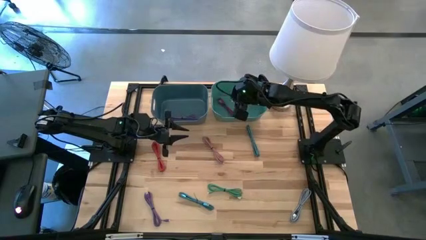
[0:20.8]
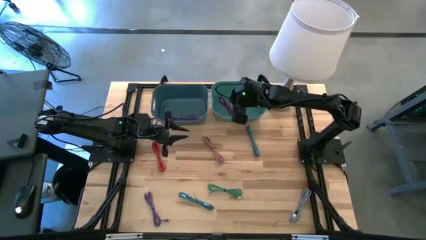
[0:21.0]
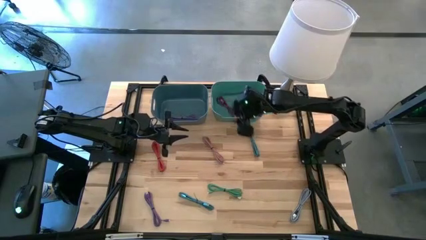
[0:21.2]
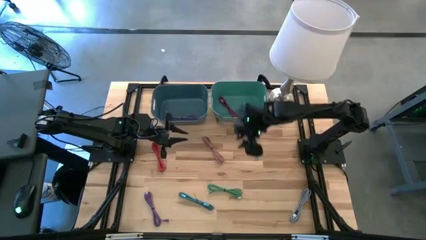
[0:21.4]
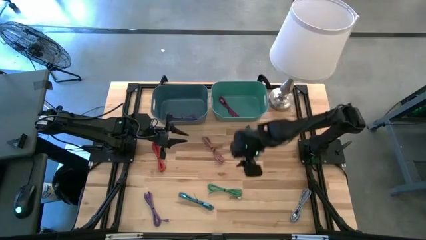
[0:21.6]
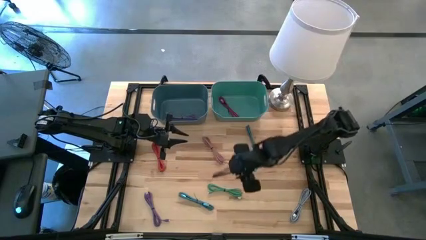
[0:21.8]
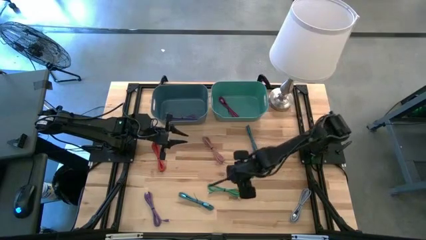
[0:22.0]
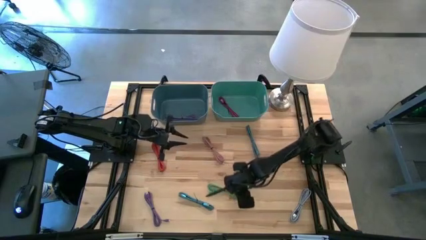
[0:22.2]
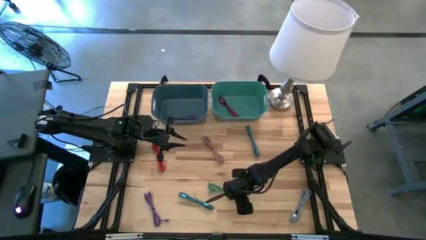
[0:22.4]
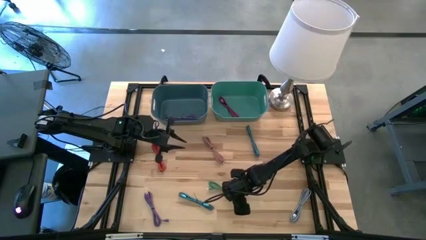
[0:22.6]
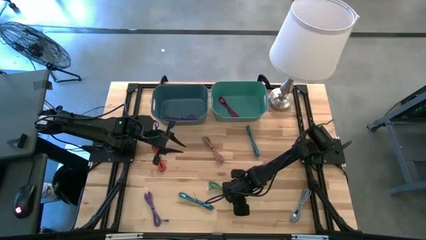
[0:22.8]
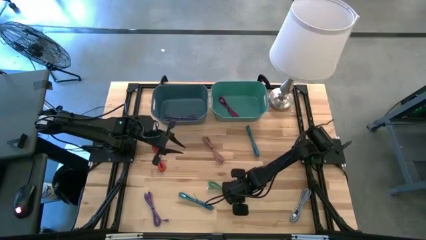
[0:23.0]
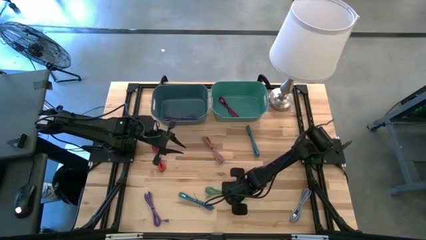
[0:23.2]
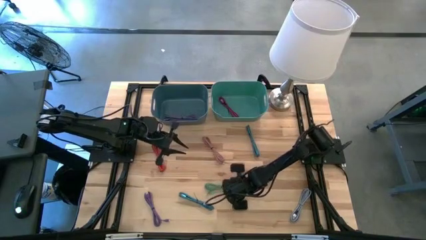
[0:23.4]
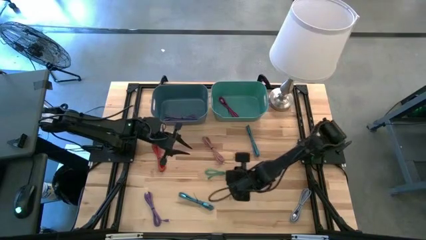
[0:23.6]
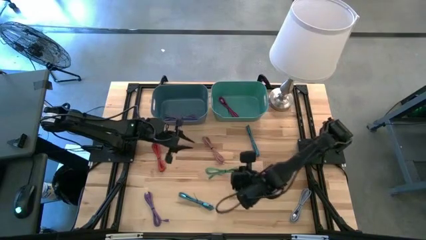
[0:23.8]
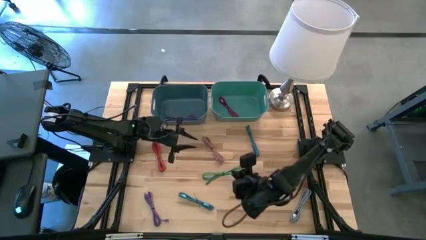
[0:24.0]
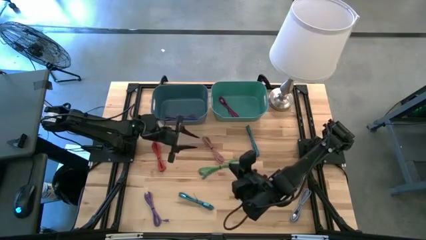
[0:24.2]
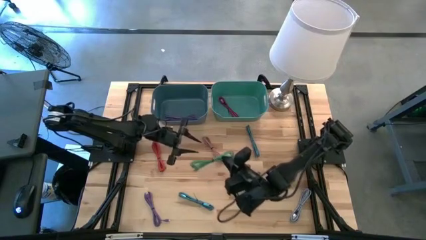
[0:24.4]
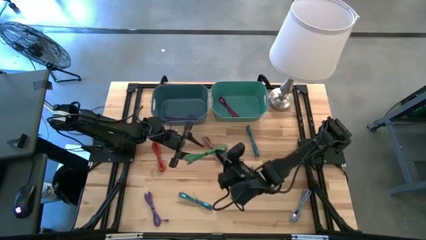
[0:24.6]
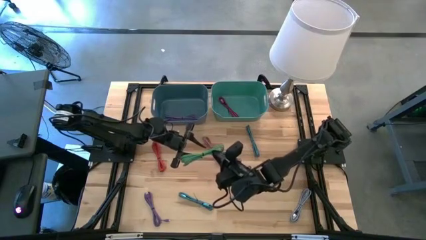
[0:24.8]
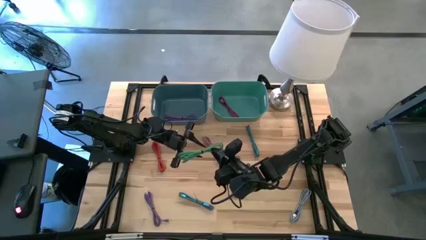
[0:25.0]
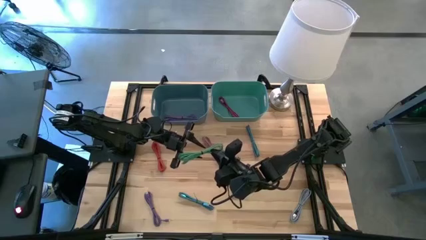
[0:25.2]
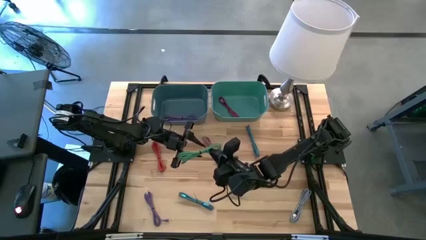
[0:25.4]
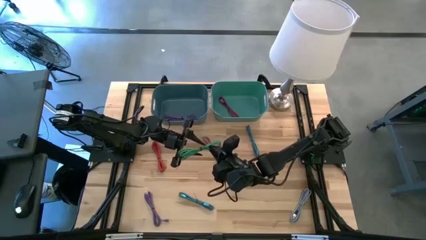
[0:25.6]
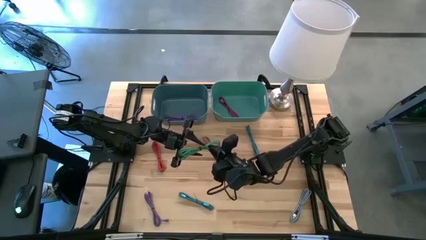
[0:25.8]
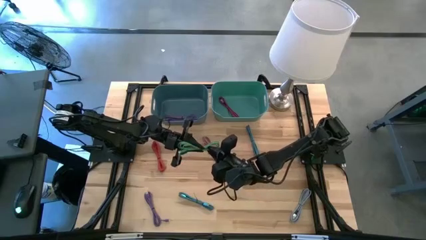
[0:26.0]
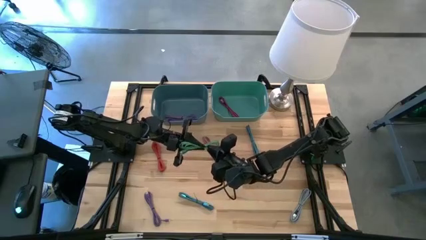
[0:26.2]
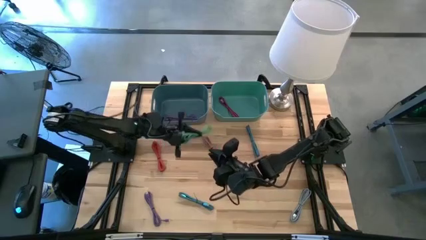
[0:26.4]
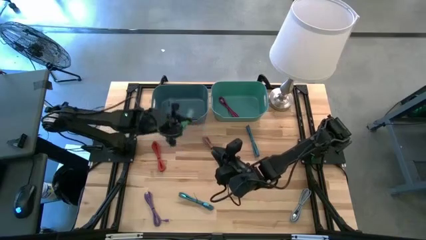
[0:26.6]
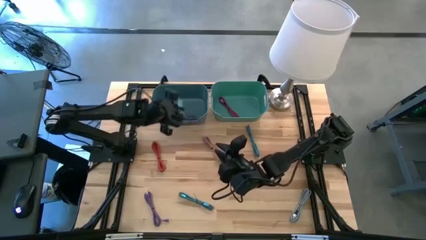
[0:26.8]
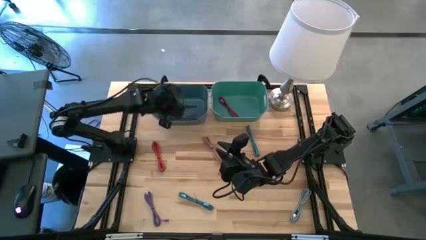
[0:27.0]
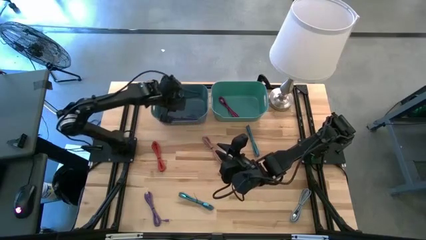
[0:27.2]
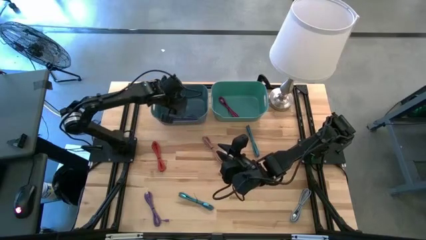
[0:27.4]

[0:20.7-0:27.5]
Task: Pick & Place USB Port
Put the green usb cable into the blue bin

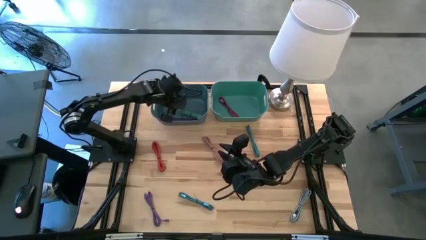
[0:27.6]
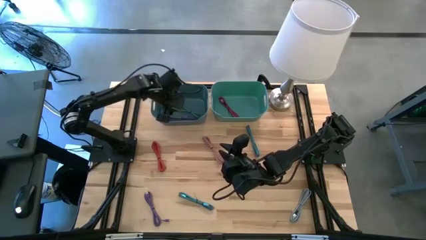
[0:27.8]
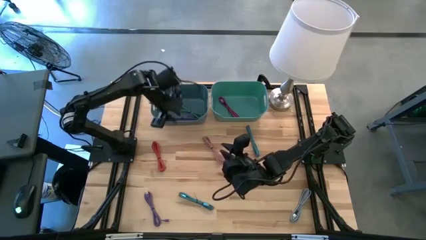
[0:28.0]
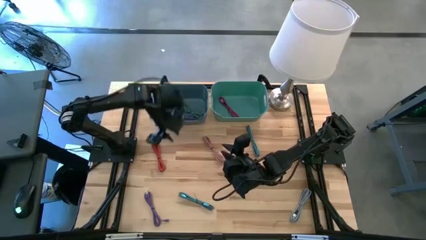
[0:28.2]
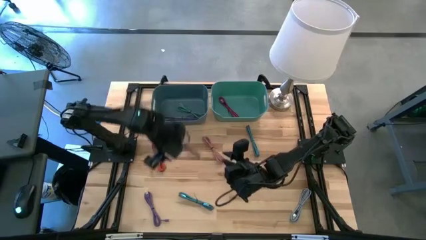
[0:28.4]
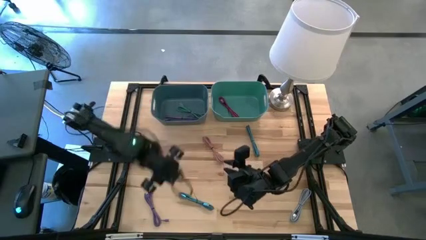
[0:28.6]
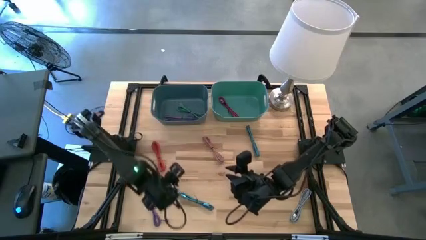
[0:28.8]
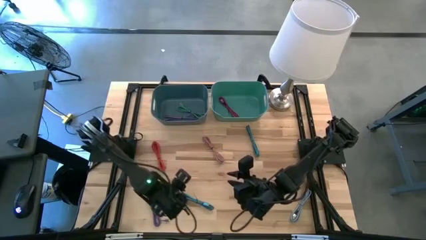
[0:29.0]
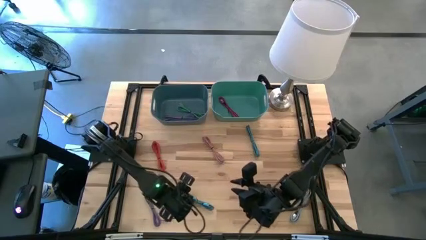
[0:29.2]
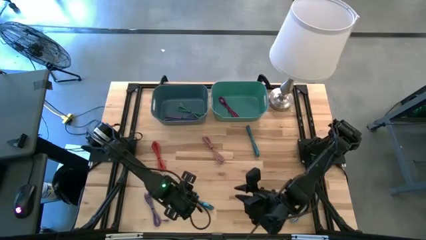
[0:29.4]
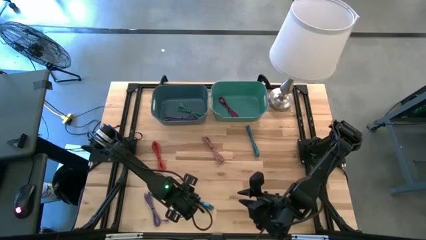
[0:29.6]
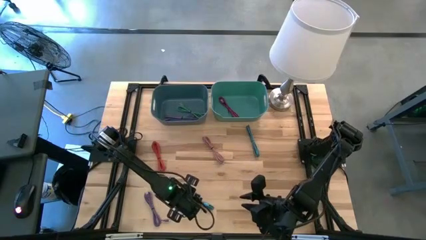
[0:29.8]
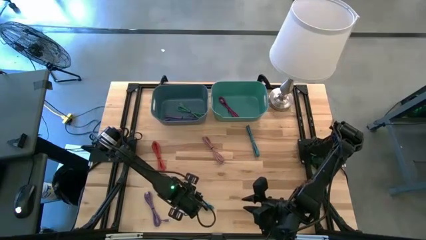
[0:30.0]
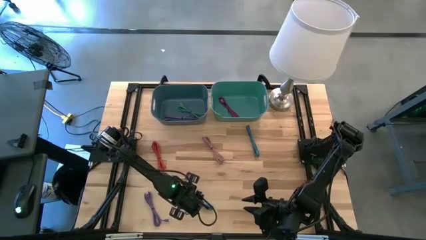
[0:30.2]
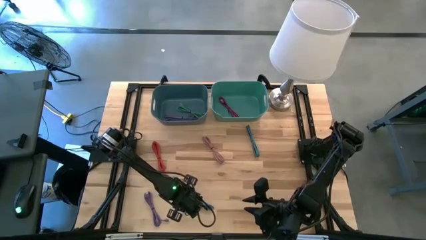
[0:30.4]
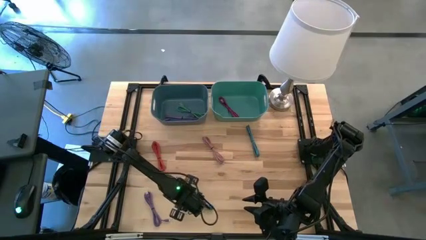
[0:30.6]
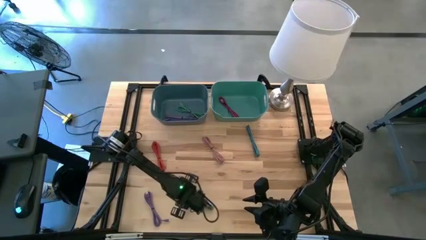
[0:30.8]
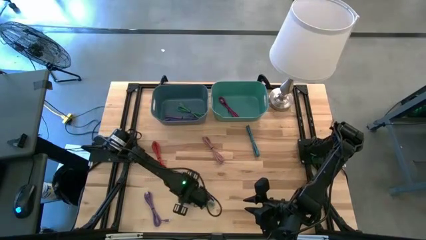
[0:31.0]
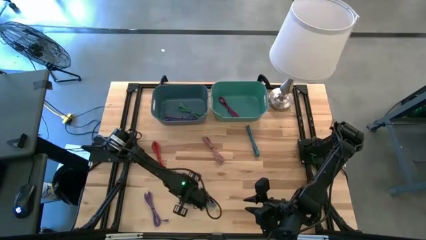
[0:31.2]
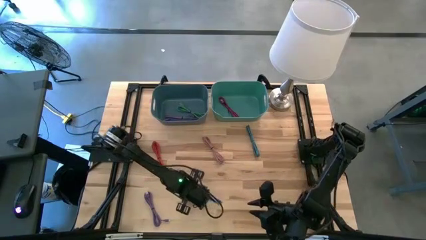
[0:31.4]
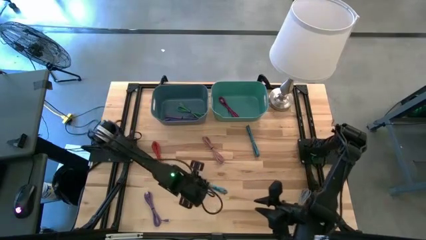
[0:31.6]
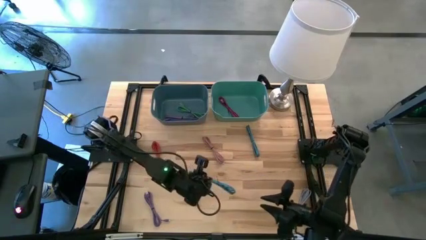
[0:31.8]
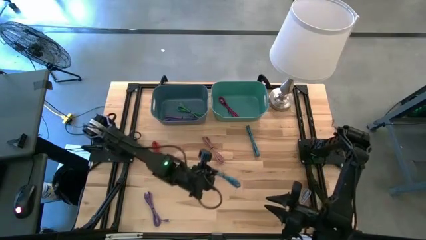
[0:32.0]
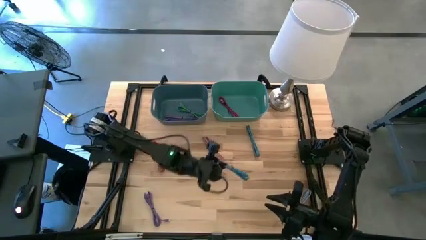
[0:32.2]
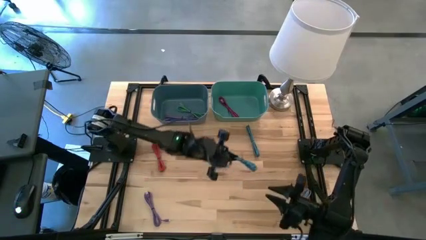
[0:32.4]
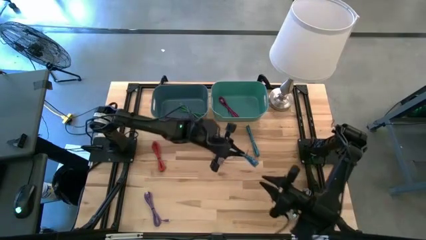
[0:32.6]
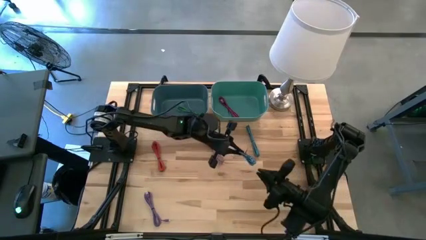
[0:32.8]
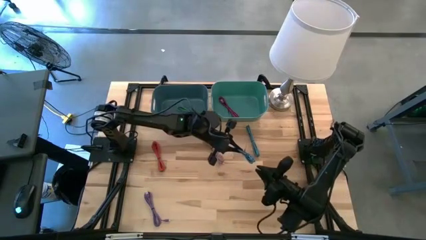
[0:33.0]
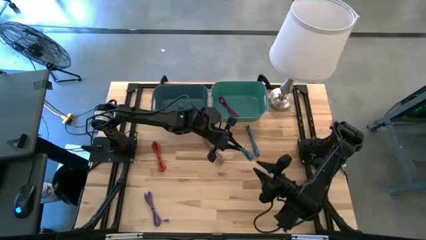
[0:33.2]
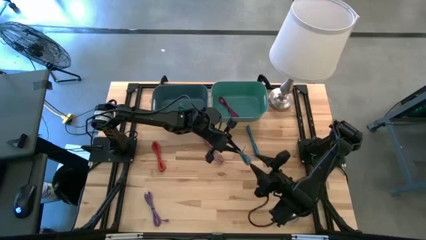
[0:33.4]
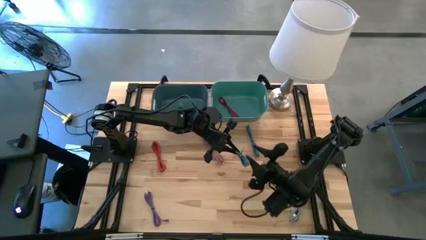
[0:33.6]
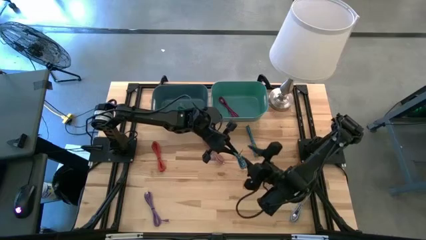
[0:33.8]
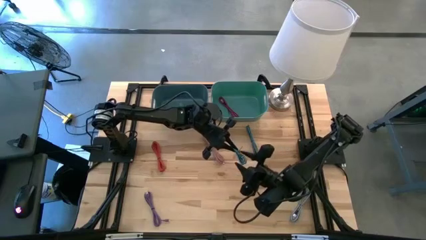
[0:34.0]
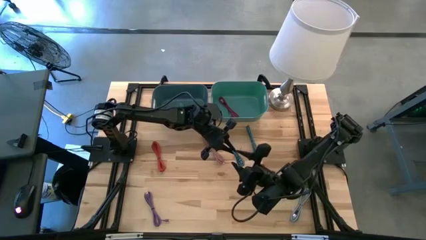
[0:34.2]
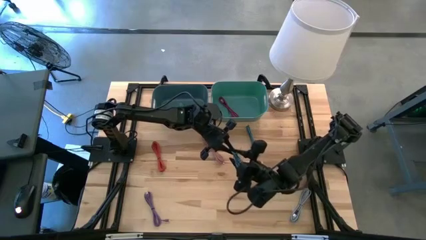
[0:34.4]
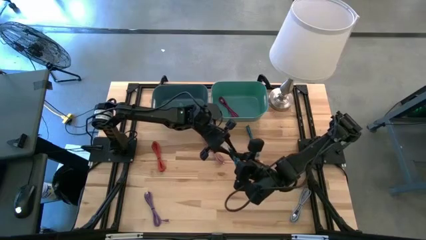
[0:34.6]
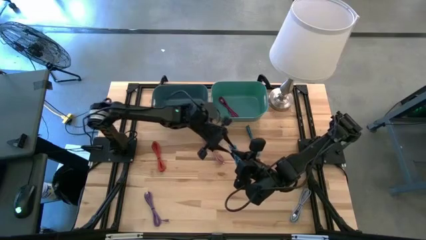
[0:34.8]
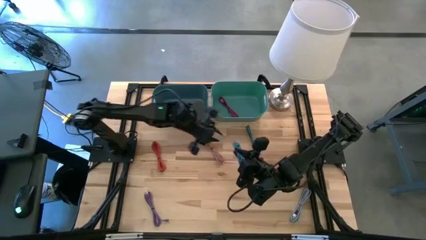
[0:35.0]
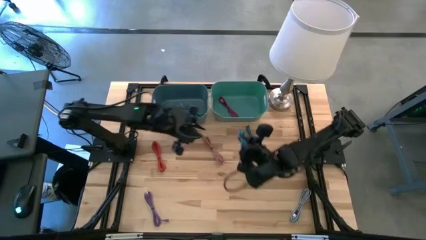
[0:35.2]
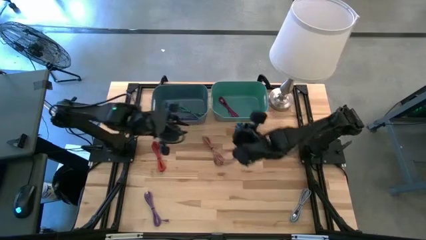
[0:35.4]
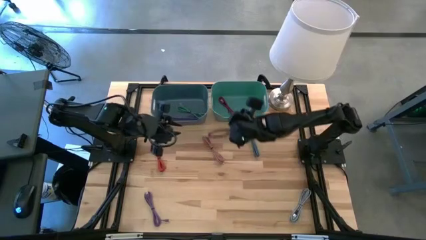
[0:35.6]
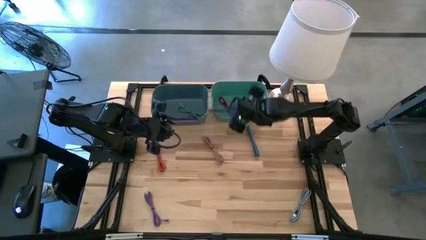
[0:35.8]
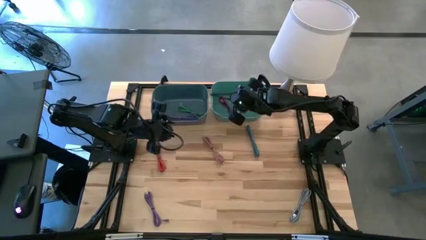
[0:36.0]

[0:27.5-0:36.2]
Put the bottom blue usb cable into the green bin

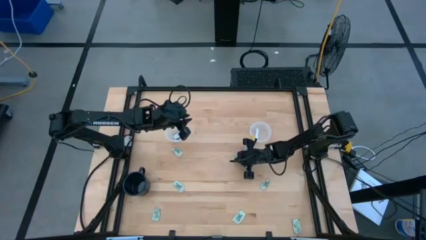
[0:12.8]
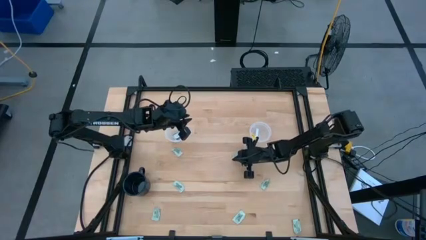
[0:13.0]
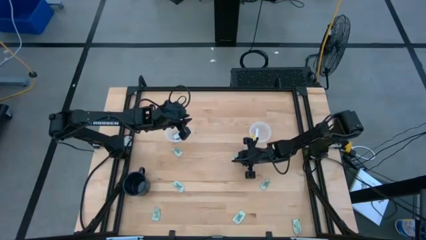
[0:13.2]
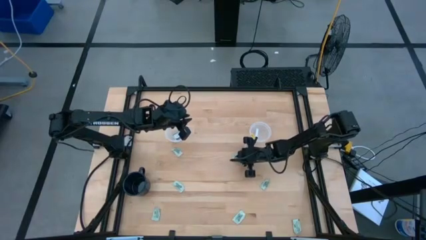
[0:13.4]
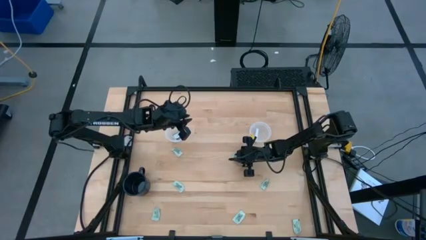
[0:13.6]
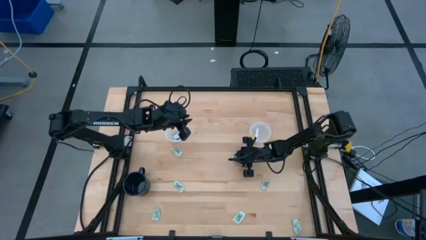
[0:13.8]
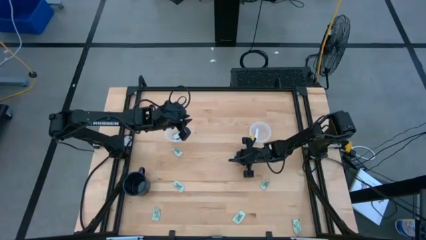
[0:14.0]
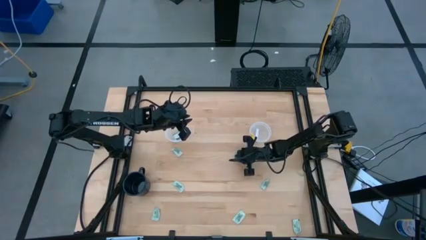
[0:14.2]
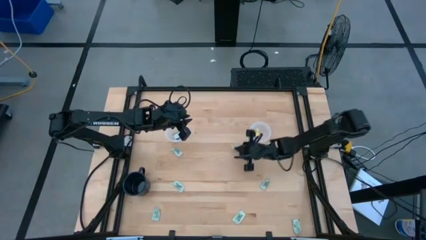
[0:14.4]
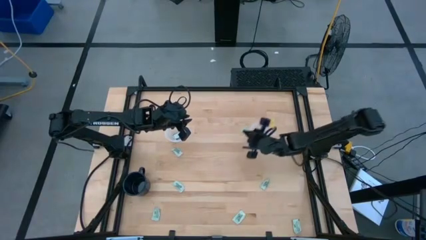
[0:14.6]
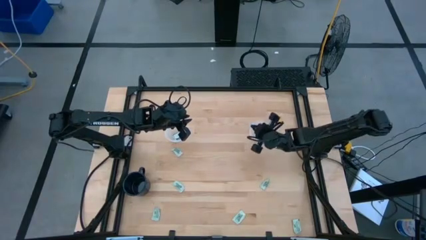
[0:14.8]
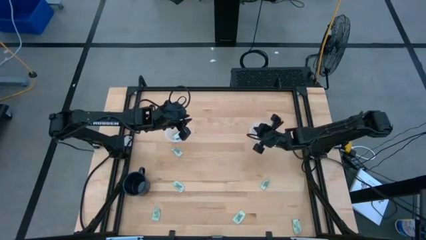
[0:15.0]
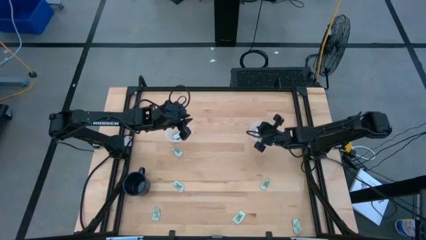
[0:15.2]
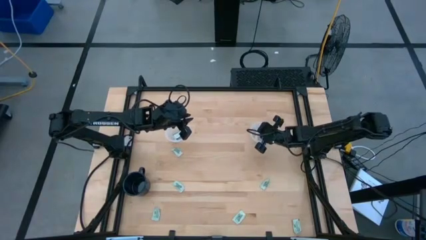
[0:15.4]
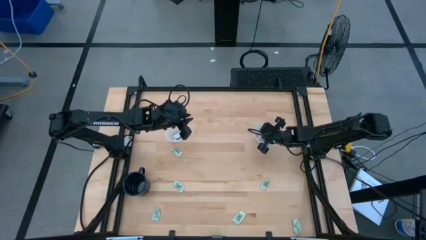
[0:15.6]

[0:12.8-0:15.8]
Task: Pick and place Stevia / Truvia into bins
Put the stevia packet into the right transparent container
